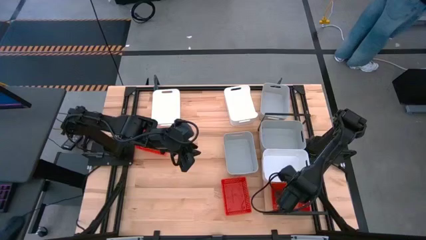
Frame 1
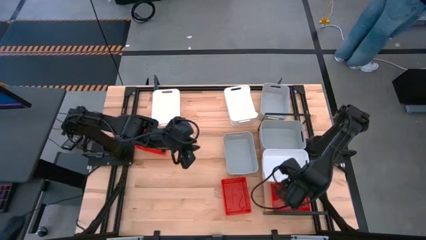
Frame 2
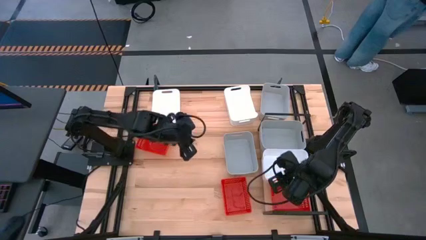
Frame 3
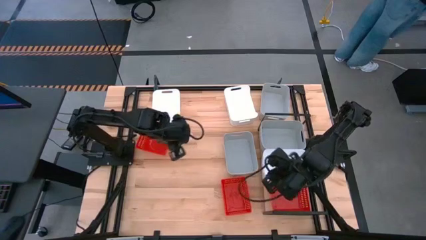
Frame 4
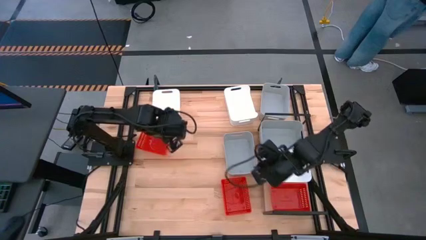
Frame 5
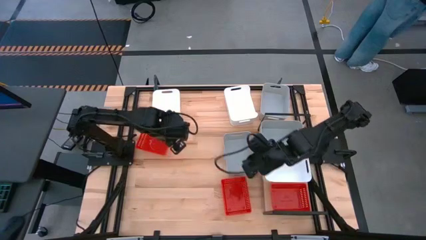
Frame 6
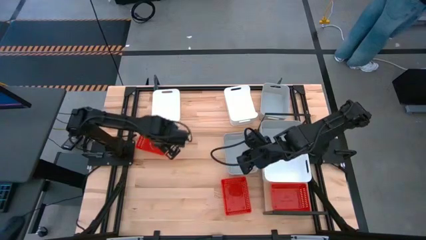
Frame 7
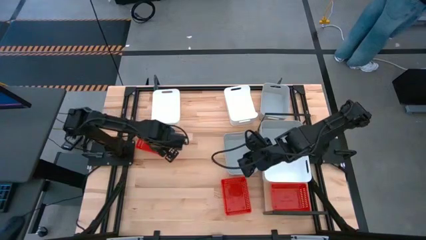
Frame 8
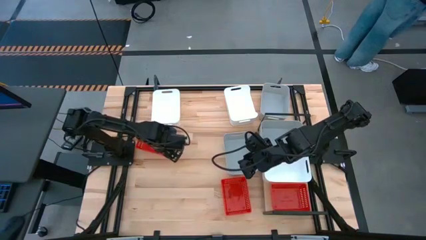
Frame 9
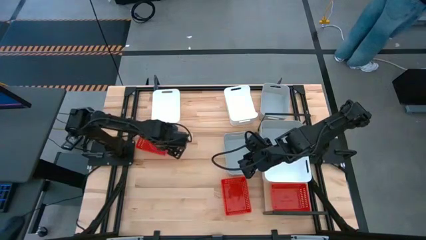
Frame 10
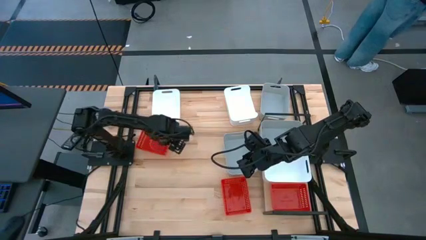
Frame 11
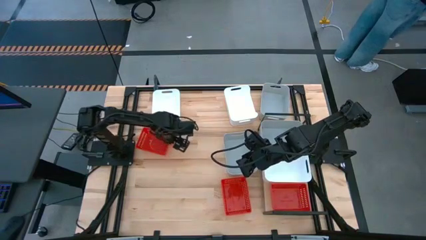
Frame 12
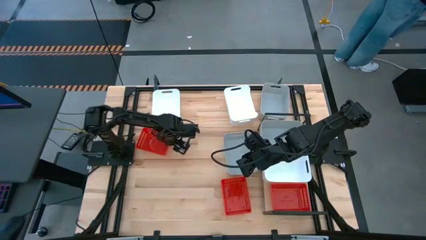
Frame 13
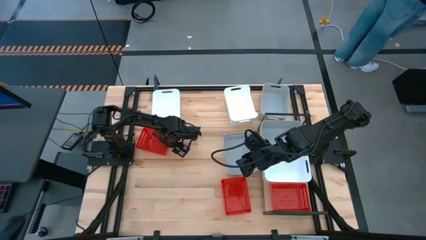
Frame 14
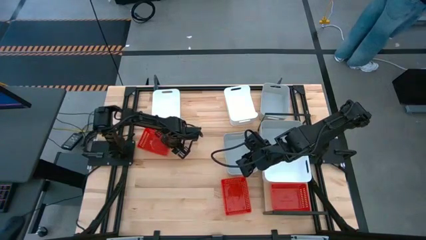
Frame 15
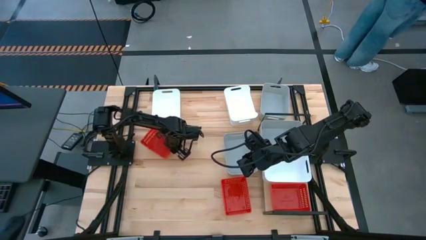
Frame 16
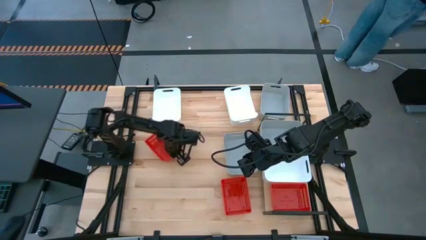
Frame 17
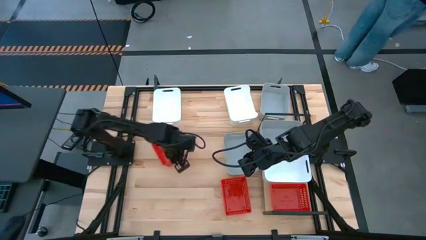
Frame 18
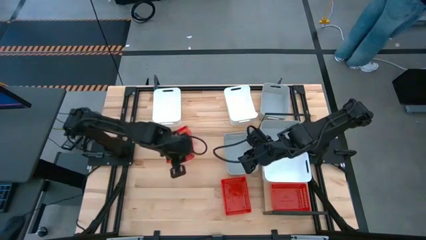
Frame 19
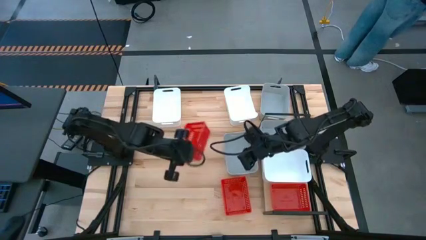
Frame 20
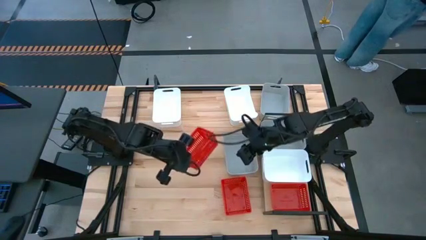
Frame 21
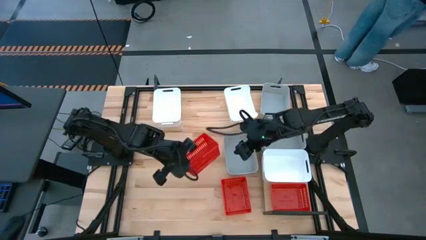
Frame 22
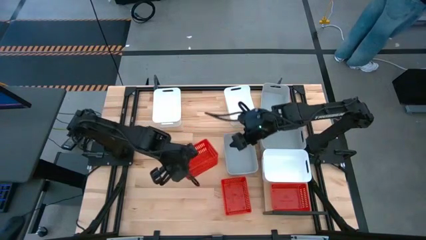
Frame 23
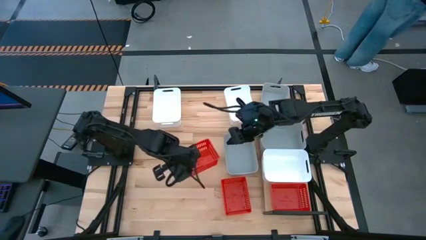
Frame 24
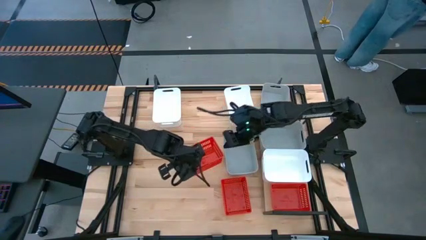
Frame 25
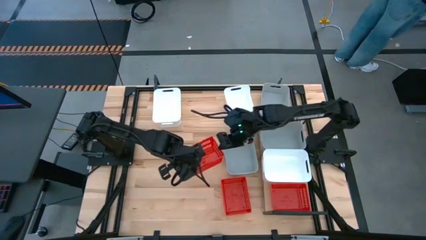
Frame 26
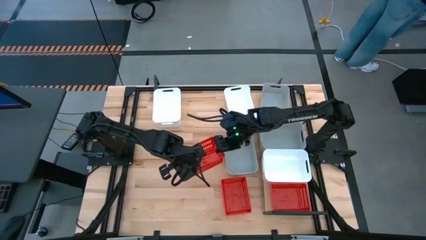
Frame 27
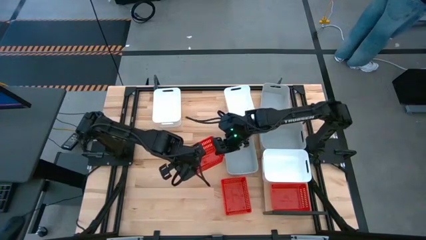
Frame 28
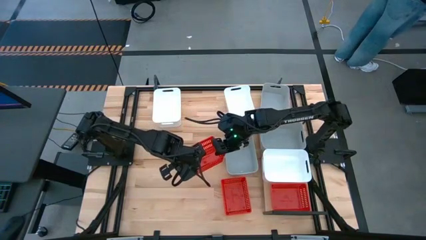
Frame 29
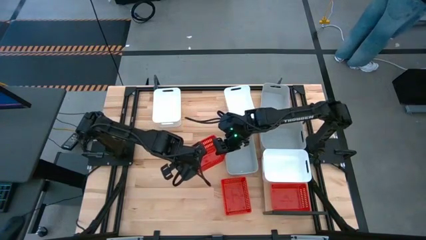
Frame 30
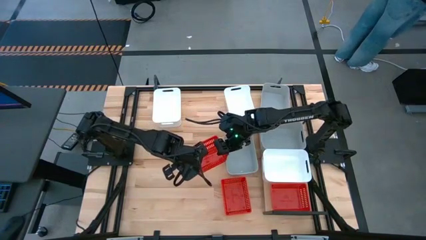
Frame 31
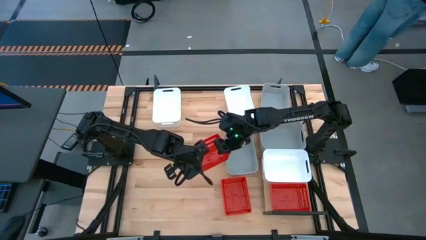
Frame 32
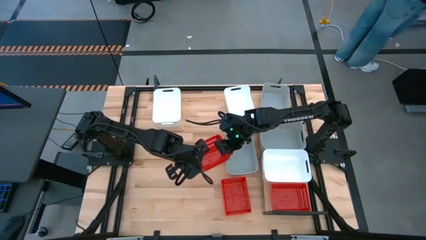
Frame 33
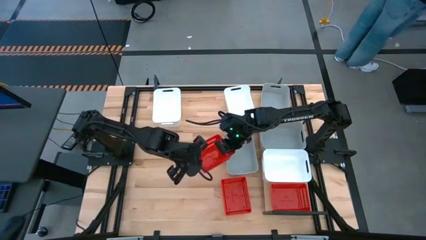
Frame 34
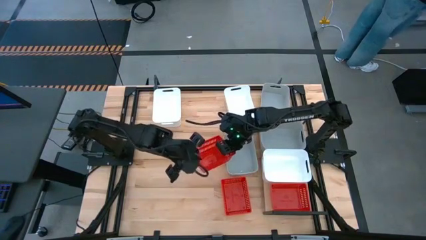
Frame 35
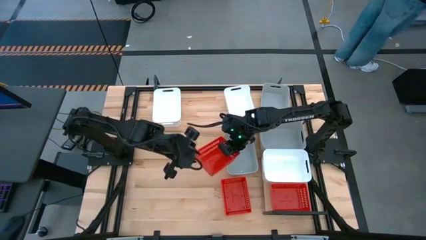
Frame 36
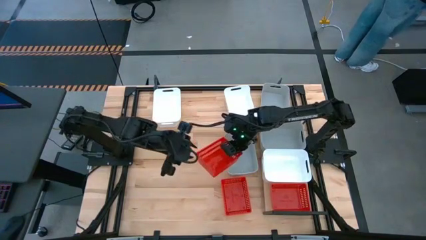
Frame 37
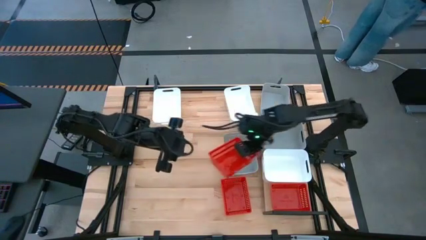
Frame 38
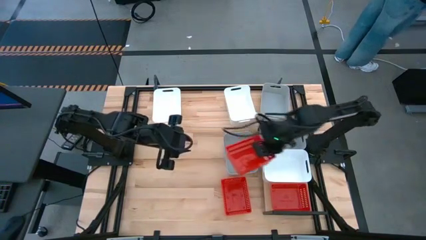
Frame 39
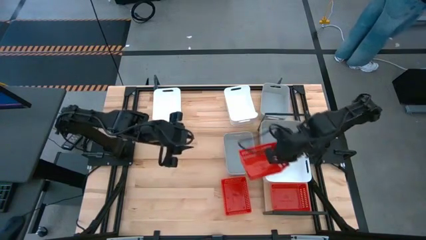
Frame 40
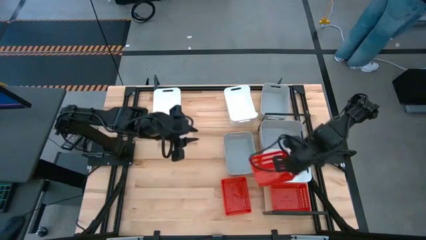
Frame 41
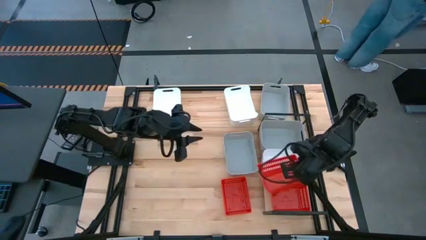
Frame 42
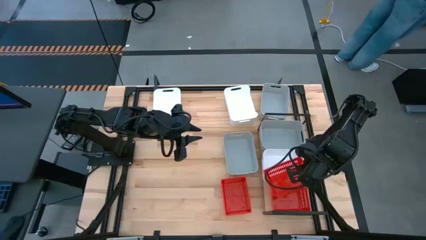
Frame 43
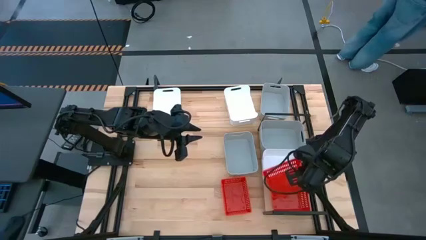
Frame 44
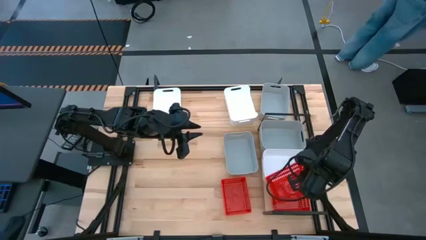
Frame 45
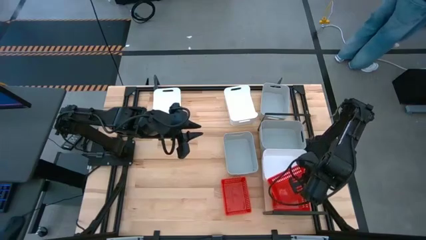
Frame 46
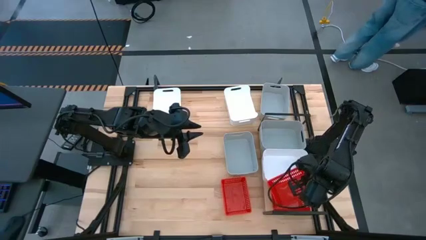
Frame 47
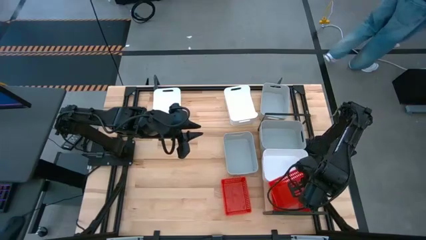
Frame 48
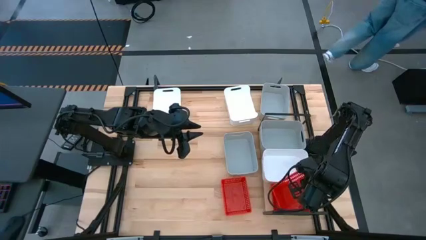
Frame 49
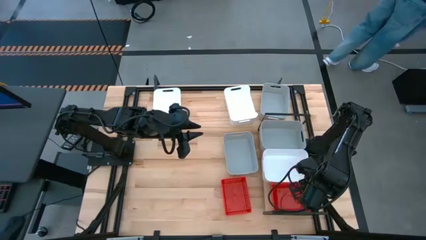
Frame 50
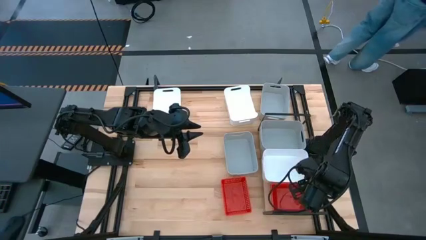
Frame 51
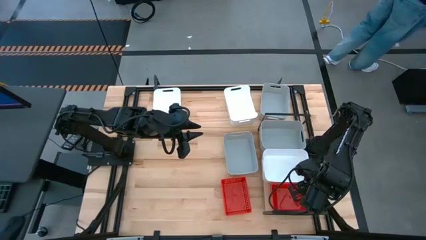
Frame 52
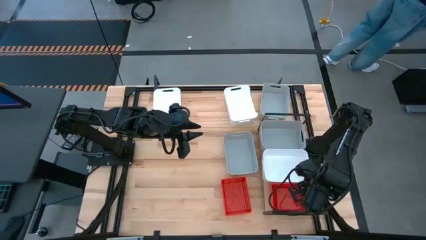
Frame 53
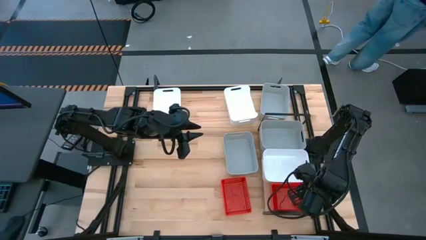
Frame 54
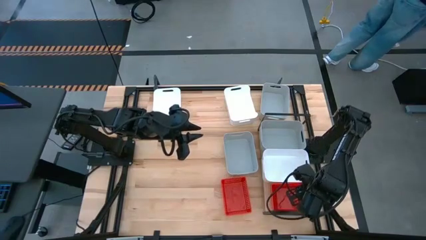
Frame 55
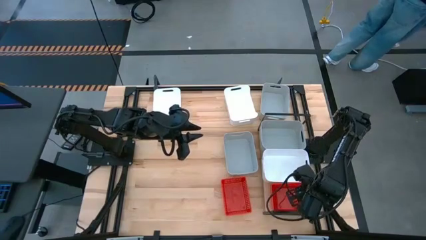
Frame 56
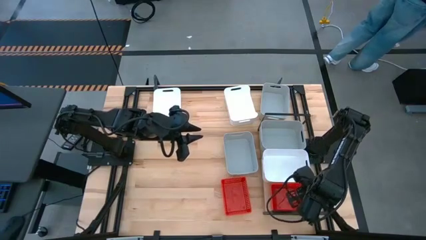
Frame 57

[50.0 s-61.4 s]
Task: Stack baskets on shelf by color
Stack the top red bin on top of the red bin on the shelf
